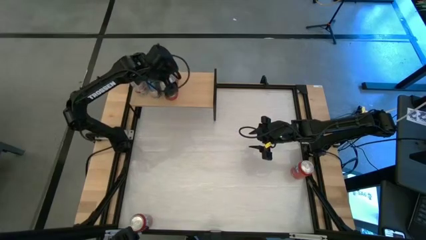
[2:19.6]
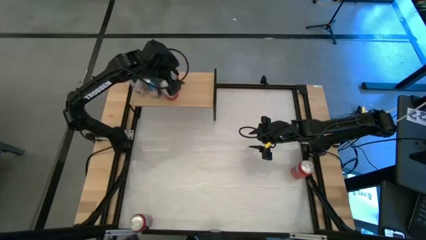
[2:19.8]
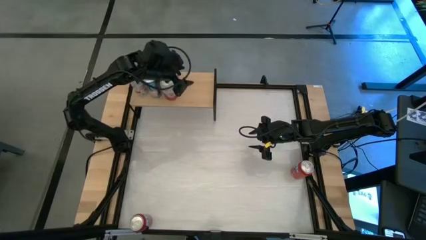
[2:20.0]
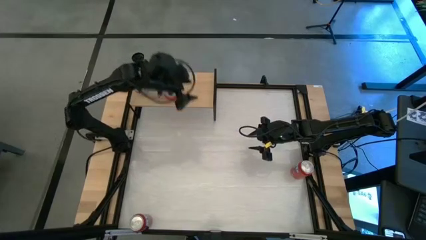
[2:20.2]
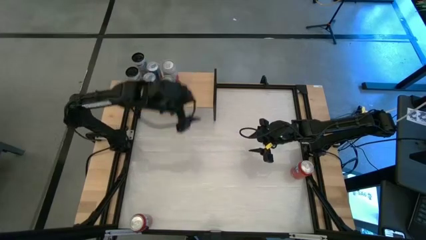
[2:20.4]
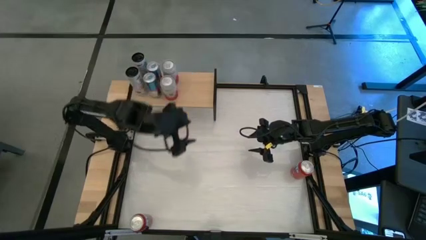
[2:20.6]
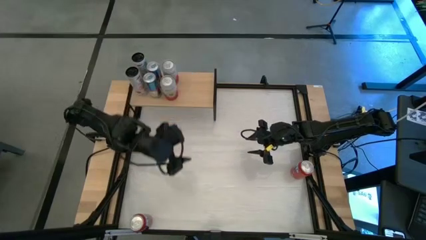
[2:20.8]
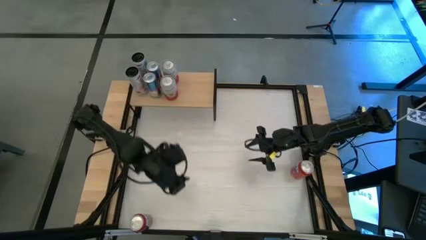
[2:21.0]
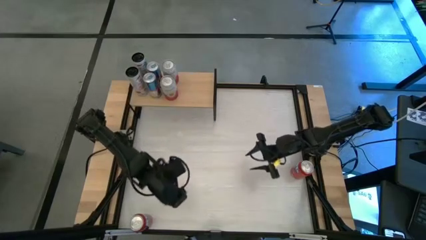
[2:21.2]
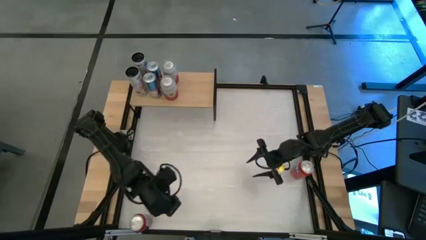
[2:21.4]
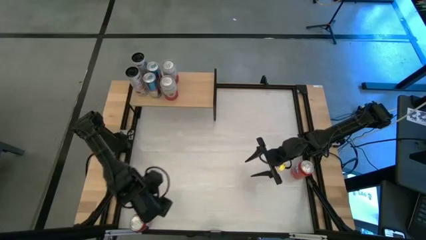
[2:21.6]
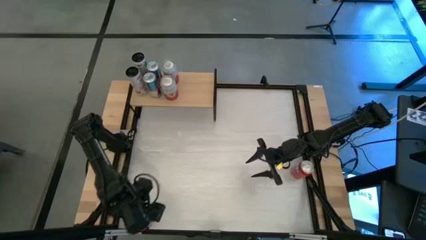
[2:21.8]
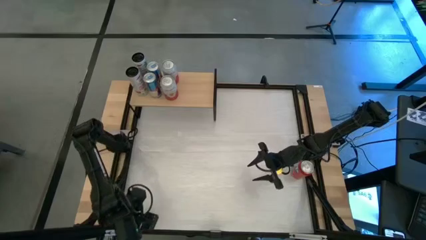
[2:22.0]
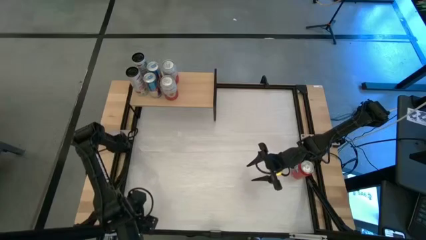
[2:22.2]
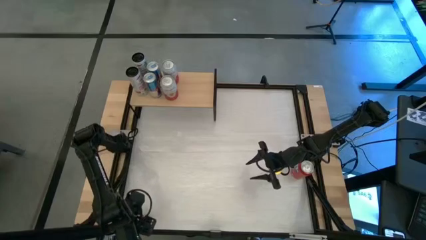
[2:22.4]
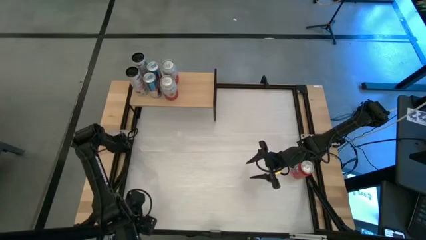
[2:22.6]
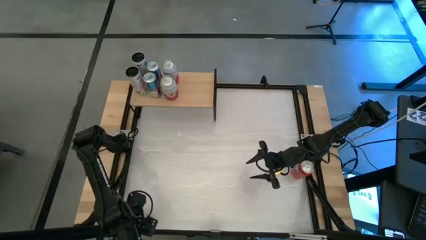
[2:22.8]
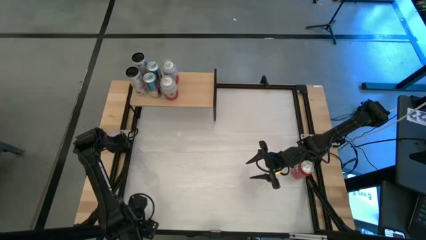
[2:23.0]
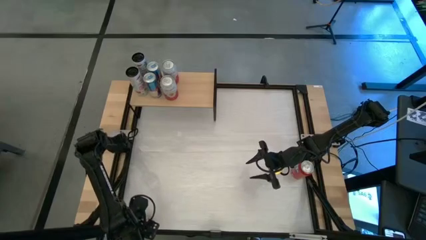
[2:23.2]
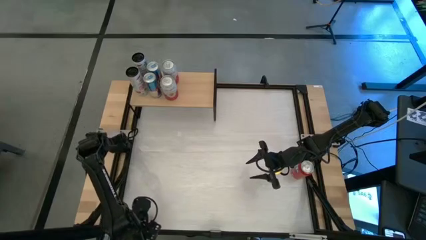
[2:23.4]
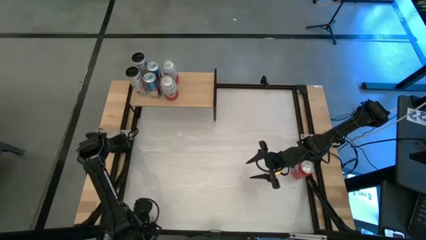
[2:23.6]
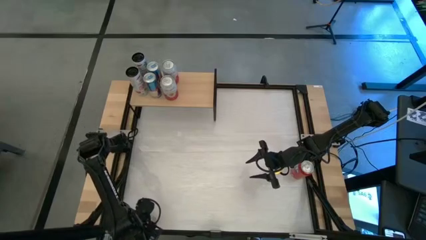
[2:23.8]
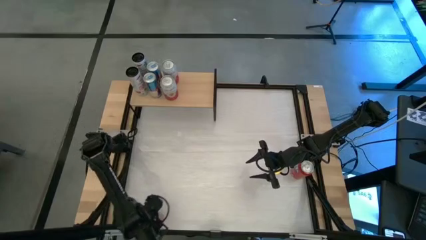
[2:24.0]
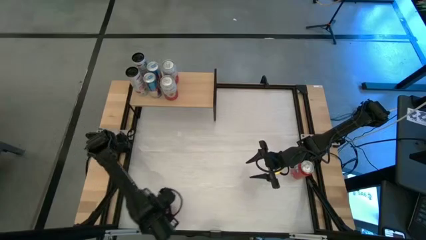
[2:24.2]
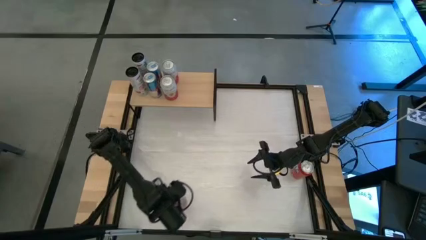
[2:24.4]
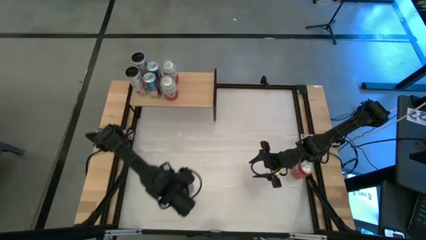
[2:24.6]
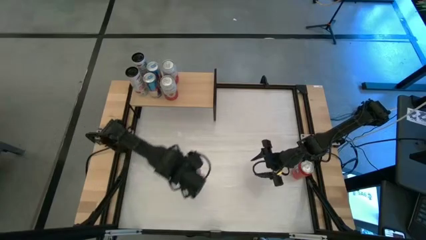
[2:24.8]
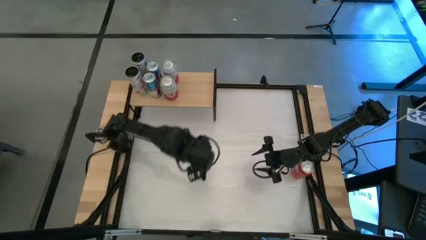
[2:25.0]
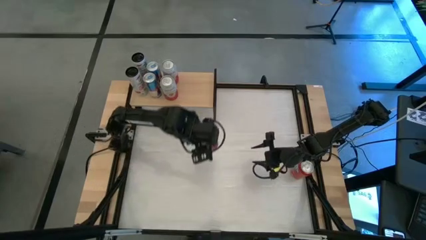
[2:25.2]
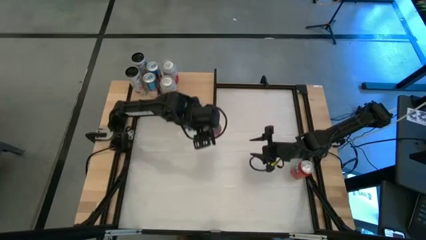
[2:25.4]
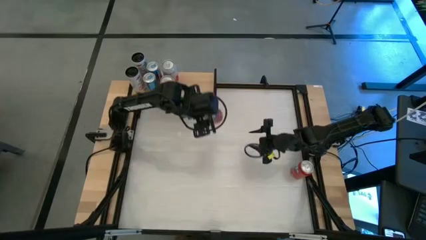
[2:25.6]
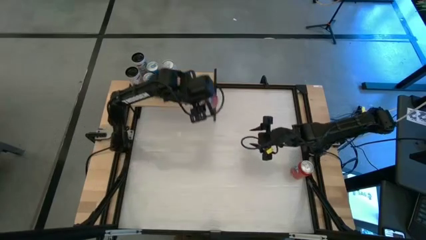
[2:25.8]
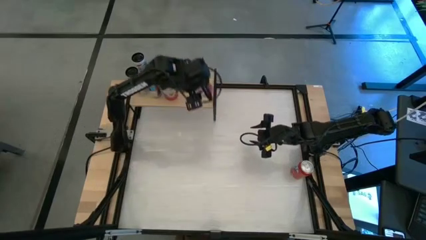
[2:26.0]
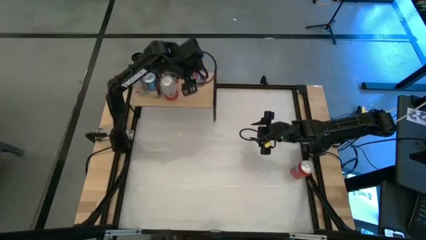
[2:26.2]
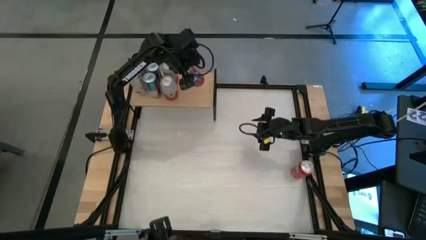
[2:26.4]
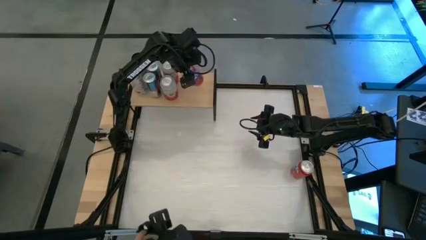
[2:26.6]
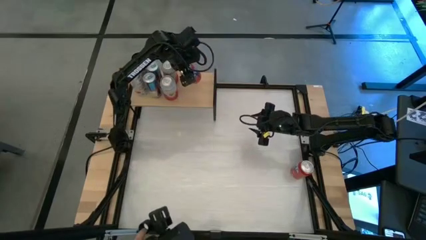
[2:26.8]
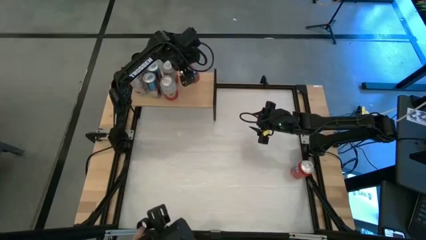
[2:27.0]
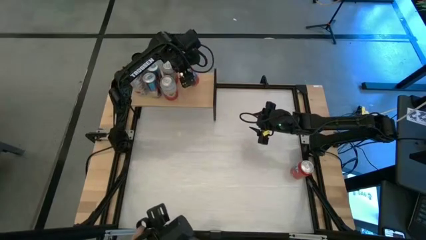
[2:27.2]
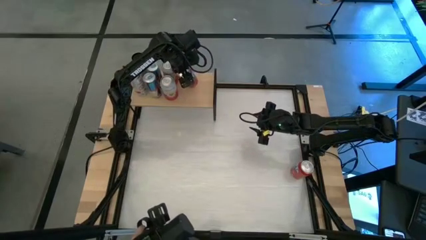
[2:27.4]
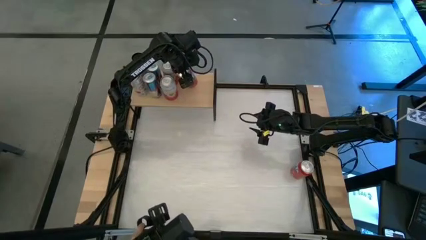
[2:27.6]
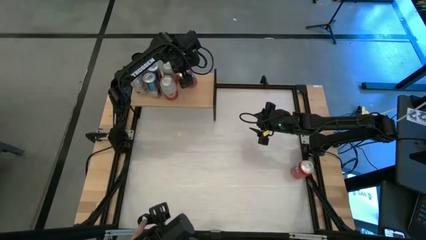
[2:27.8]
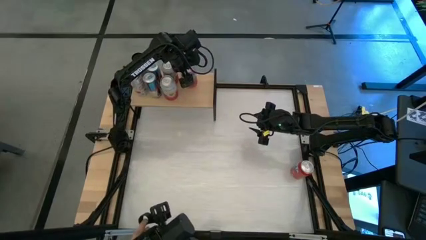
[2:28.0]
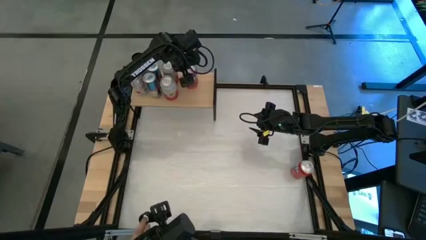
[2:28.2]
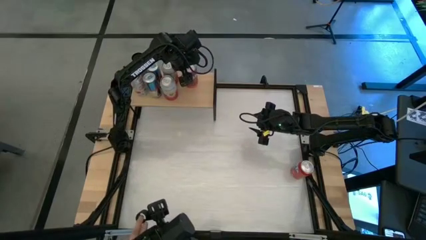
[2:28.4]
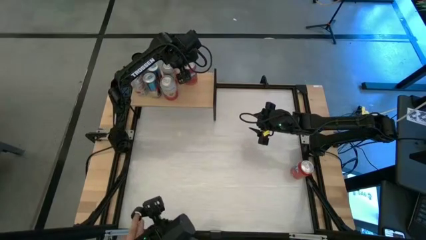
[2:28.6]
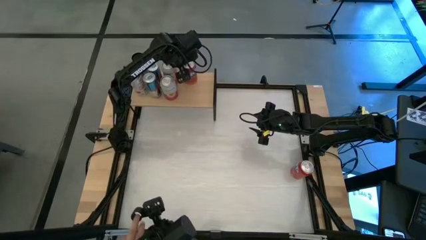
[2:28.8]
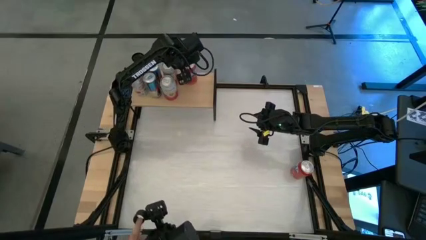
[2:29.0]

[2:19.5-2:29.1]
Task: Place canned beverage on shelf
Put the bottom red soda can on the shelf

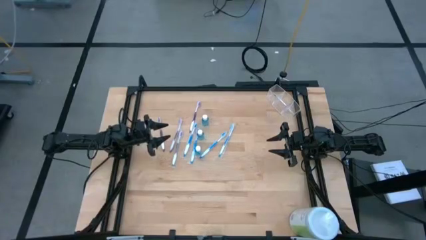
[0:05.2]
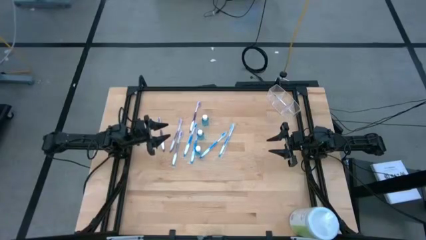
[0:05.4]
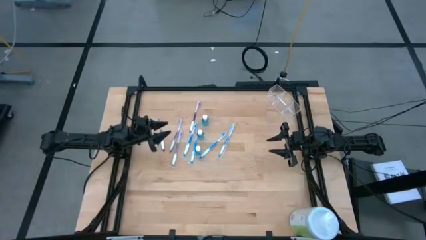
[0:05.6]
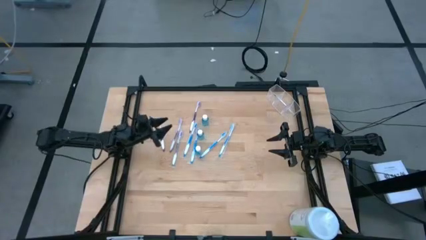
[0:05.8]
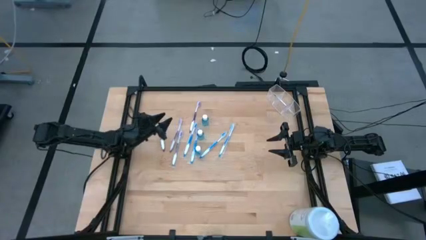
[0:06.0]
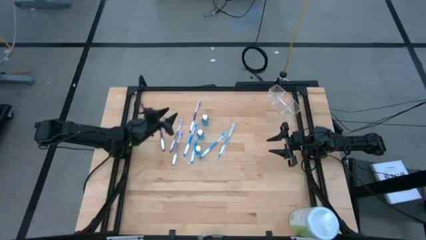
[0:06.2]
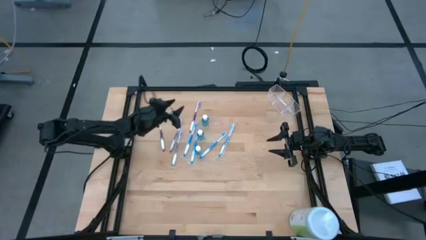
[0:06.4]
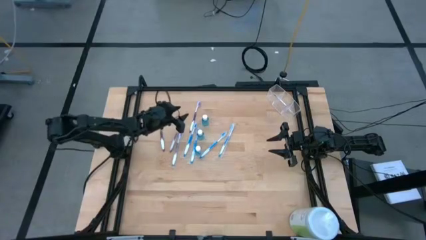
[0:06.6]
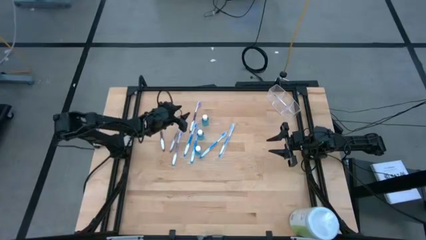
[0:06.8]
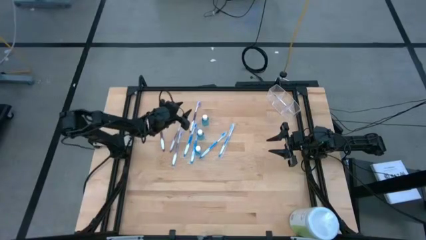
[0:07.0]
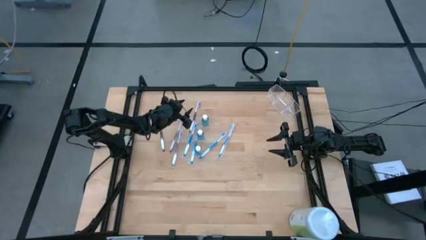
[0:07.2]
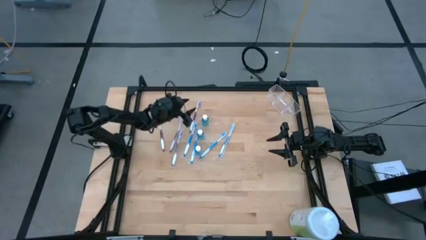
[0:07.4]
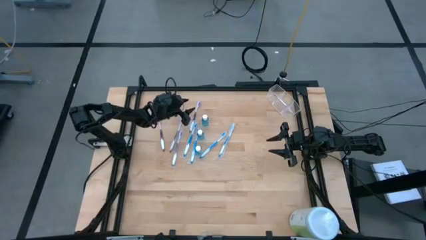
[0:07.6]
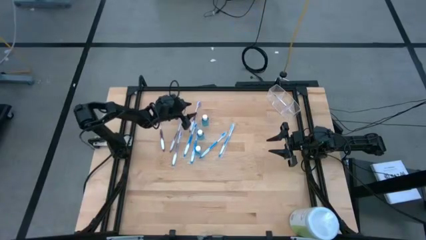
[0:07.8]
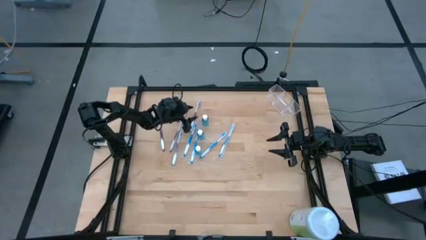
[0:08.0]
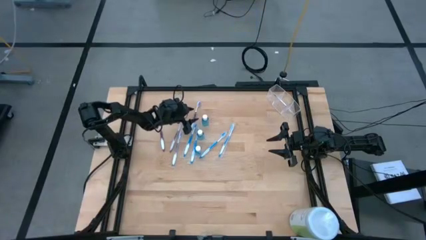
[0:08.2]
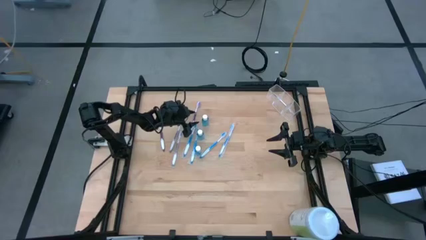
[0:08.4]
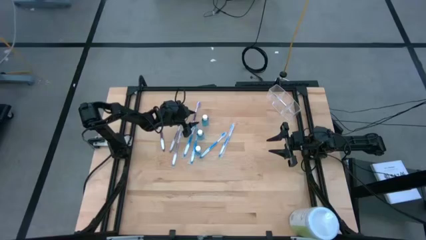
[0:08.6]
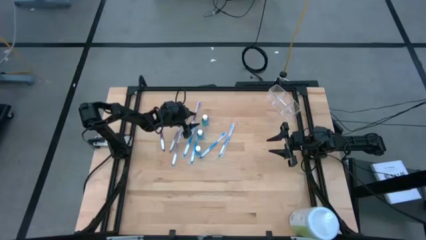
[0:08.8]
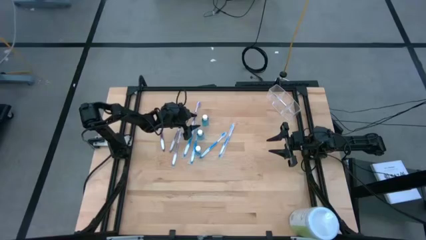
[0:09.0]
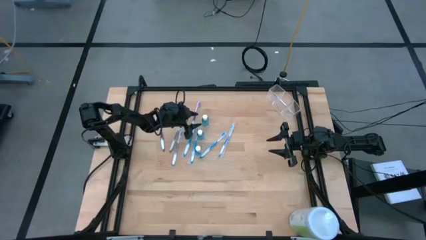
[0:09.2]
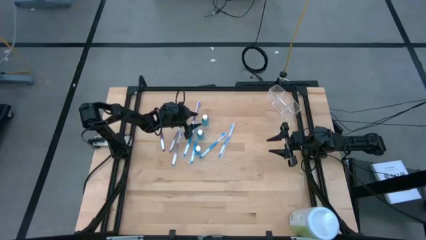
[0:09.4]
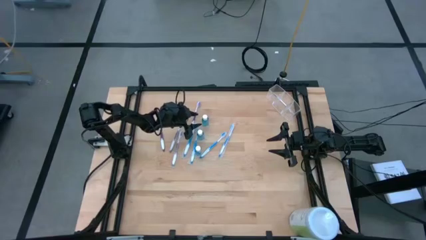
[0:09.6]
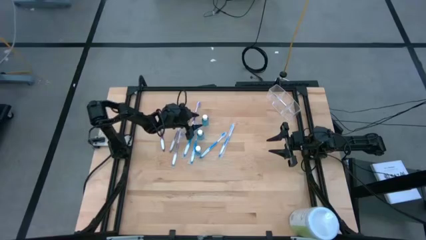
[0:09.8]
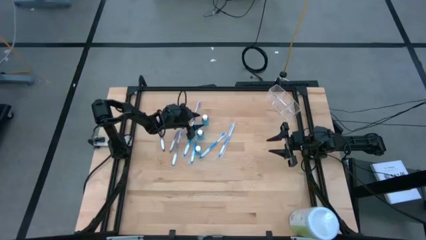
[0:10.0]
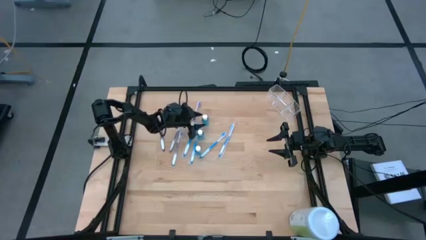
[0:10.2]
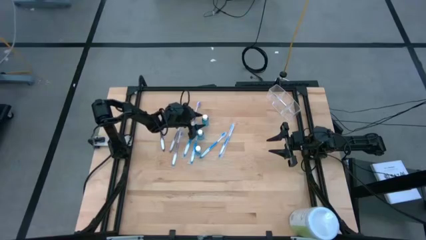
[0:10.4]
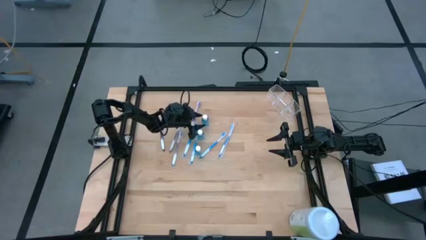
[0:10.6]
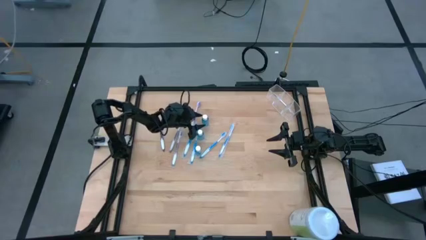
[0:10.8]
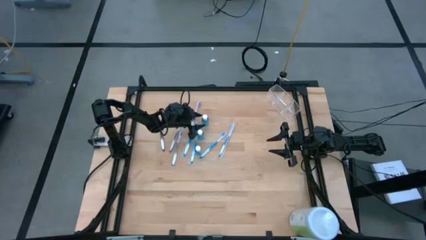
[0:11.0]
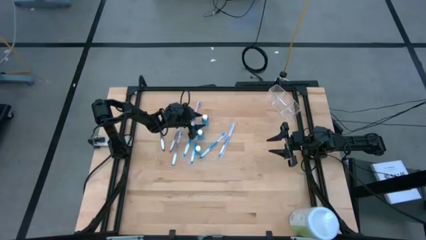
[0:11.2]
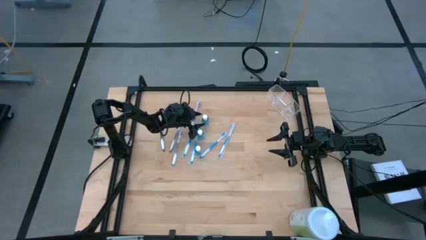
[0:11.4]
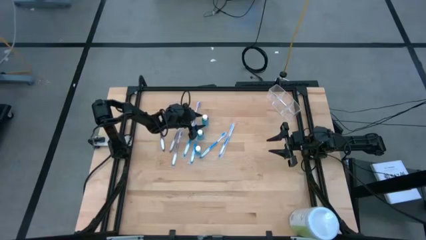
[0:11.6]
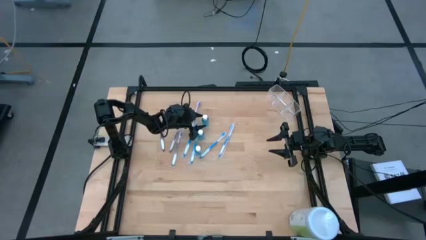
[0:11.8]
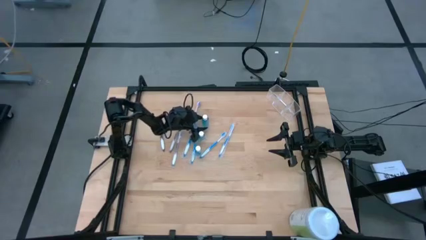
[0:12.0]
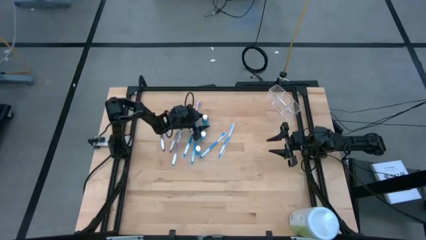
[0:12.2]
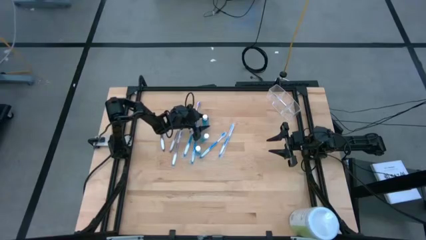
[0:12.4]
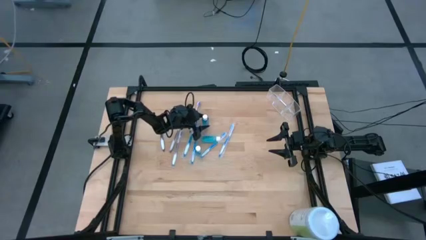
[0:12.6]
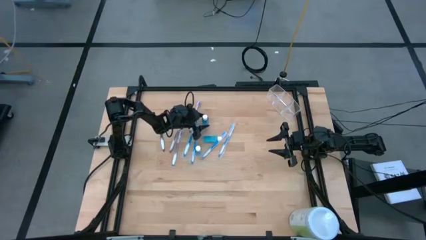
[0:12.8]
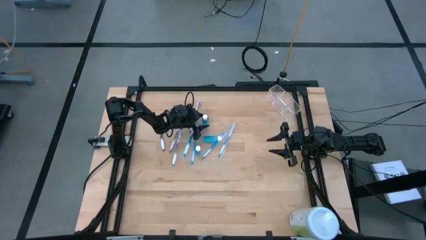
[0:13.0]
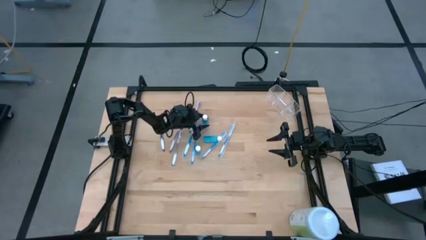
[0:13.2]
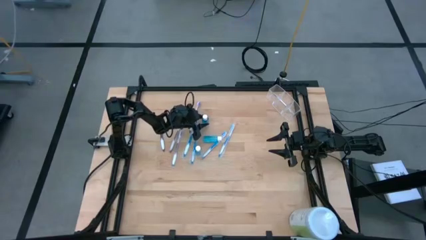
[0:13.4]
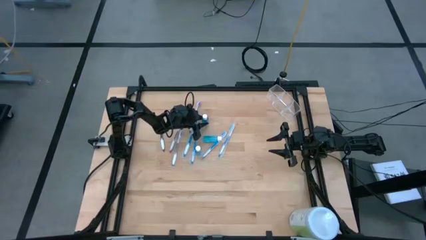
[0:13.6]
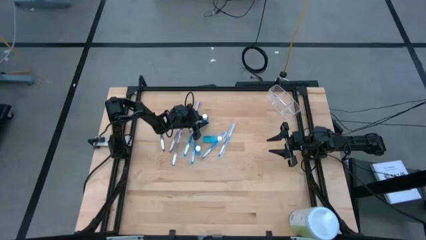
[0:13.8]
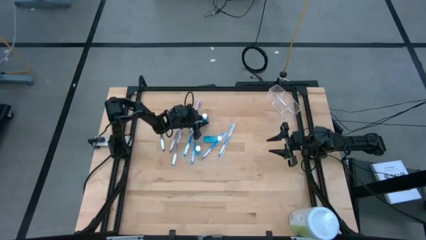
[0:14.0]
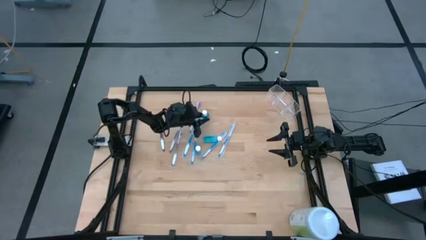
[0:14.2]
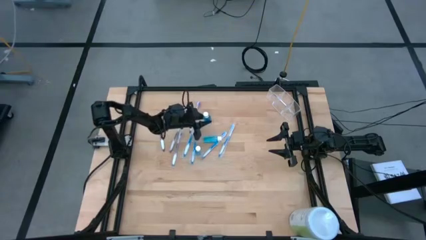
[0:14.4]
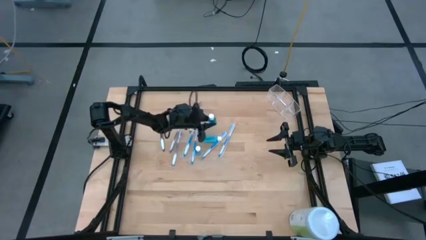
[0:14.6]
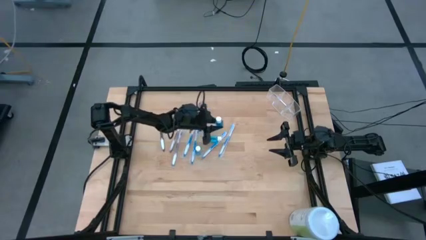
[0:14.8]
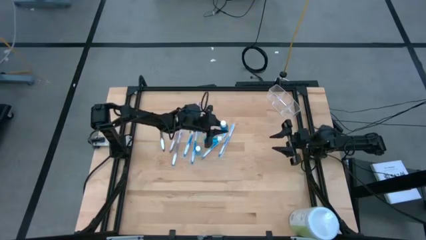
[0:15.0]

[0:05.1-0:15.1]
Task: Pick & Place toothbrushing station
Put the blue mouthwash into the middle of the transparent organizer
